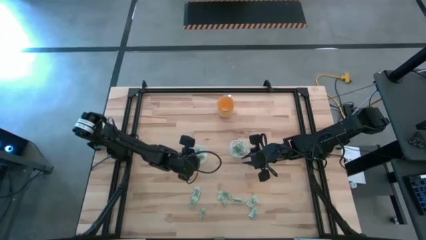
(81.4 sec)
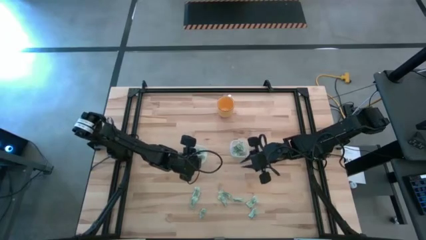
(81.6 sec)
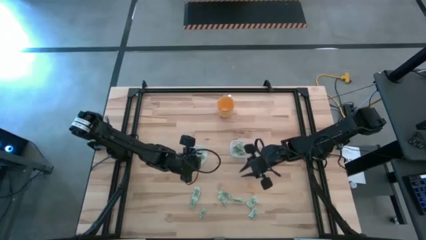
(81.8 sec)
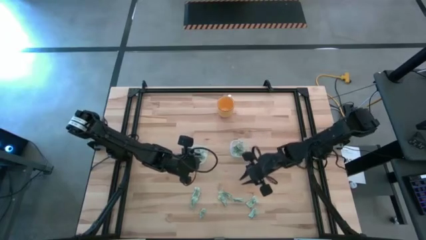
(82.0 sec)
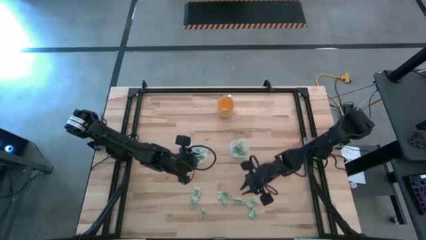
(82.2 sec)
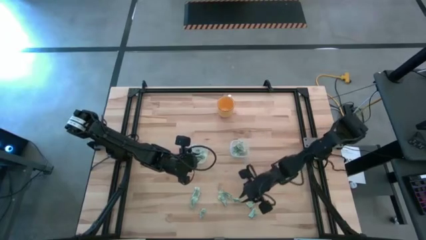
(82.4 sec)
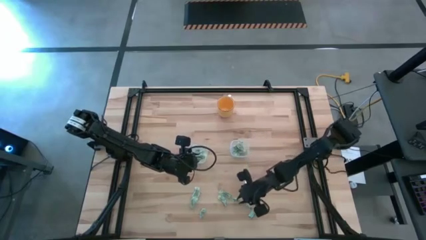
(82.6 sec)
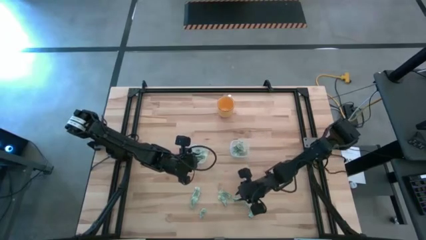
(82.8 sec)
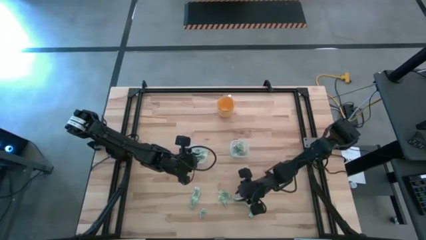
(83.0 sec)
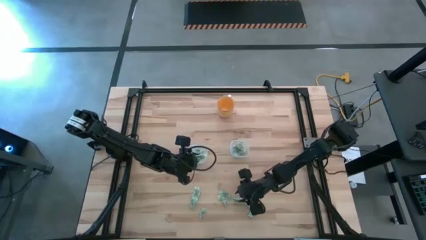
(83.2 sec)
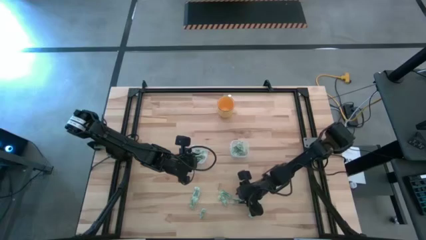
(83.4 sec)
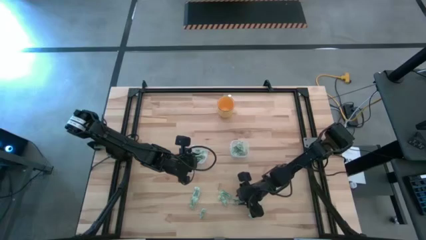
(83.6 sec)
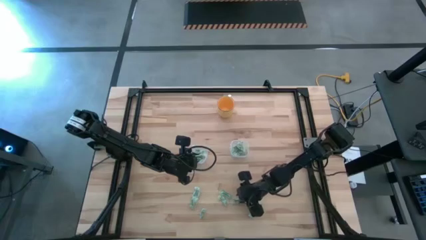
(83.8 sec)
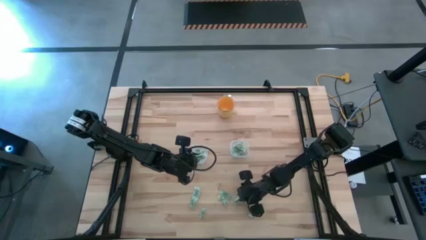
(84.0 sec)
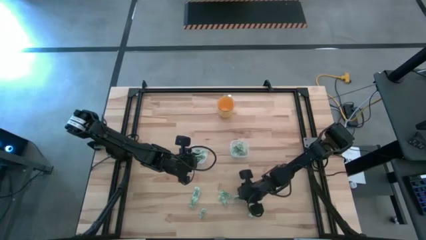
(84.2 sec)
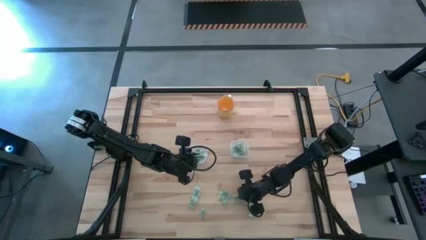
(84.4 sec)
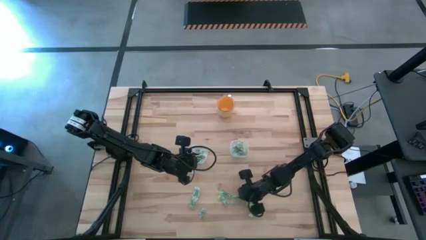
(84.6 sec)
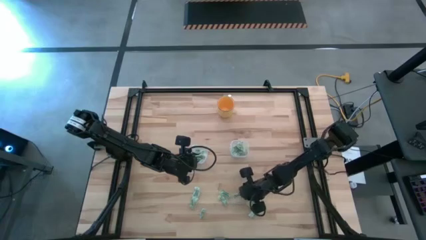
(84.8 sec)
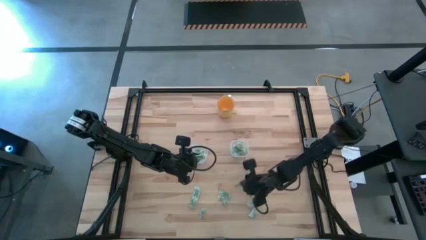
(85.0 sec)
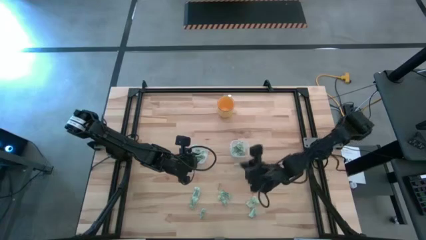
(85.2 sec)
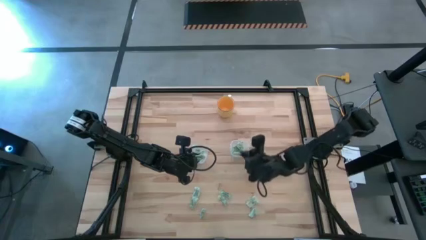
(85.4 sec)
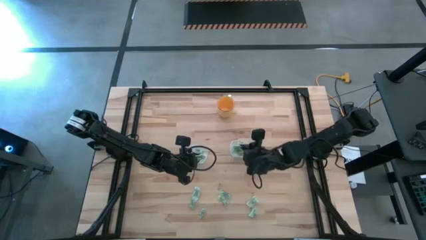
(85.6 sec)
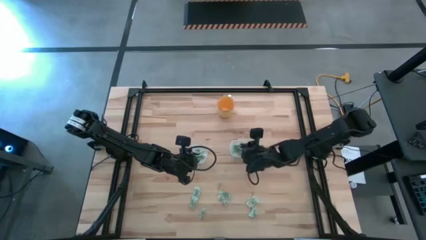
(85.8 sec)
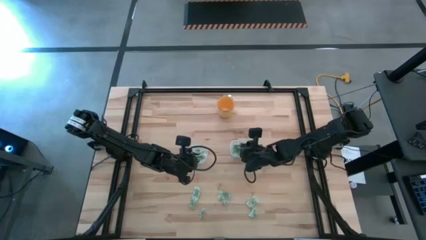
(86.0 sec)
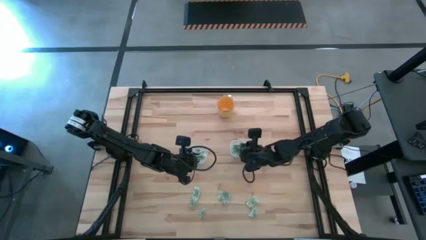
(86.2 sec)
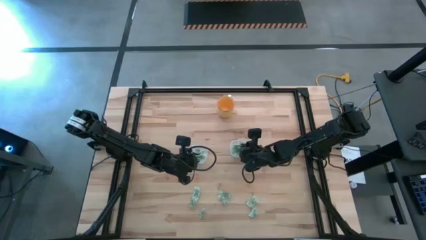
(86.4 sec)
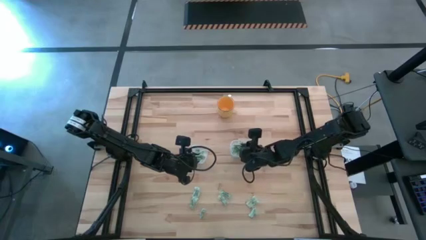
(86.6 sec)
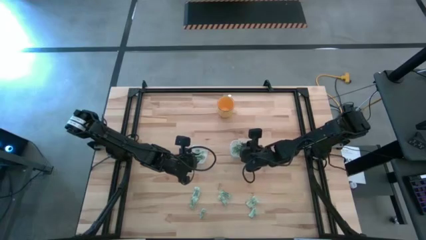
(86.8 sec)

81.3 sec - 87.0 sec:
Task: Pick and place items into bin
Put the green sweetener bag into the right transparent food container

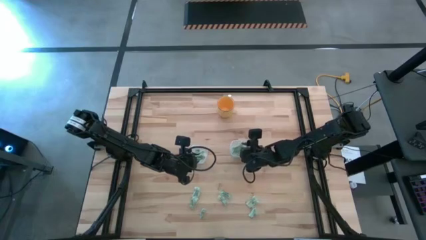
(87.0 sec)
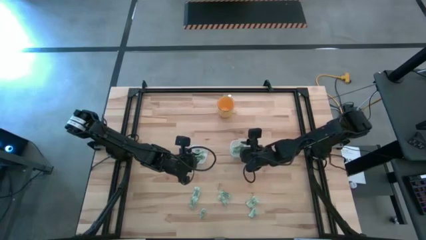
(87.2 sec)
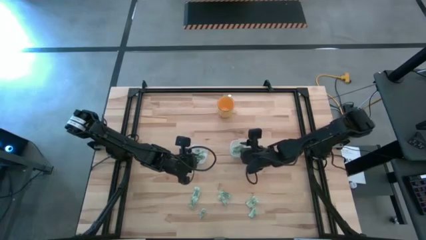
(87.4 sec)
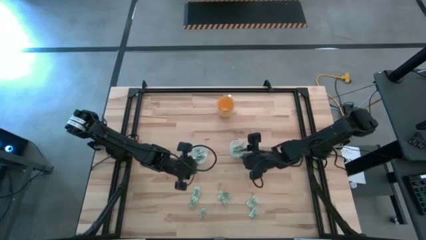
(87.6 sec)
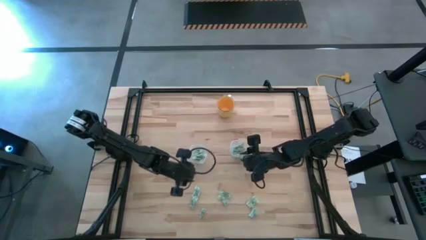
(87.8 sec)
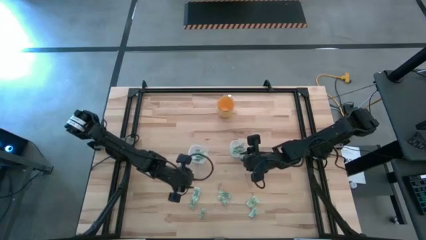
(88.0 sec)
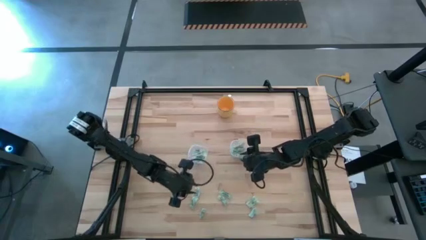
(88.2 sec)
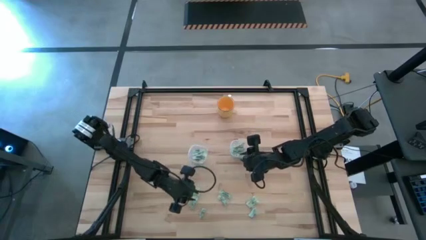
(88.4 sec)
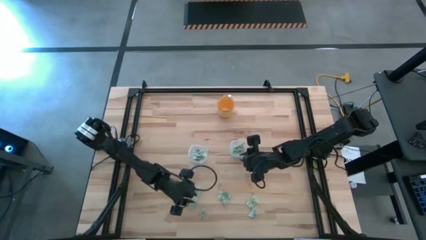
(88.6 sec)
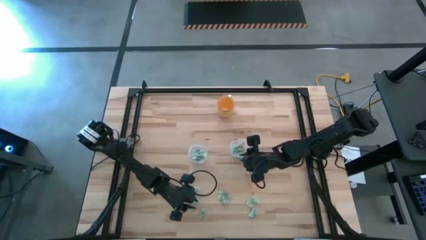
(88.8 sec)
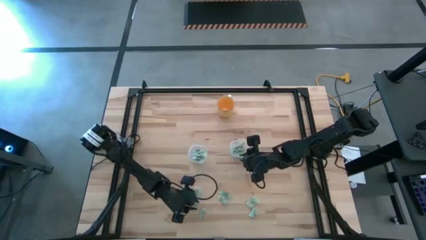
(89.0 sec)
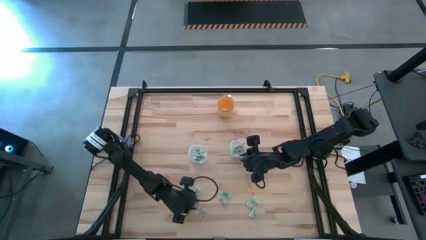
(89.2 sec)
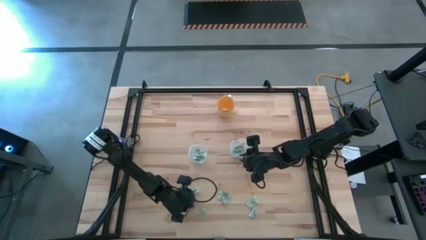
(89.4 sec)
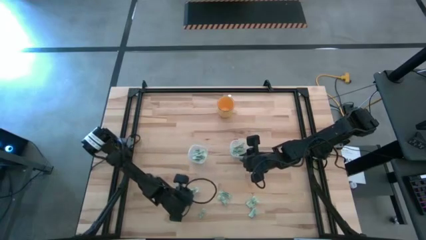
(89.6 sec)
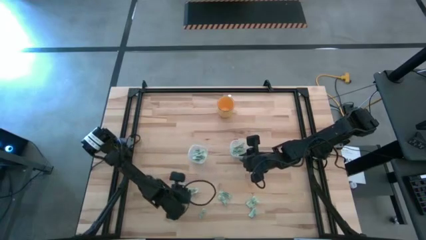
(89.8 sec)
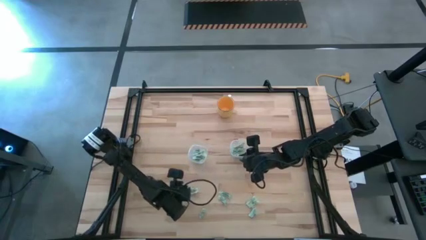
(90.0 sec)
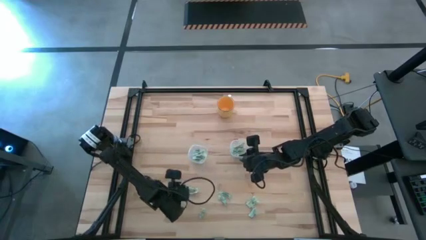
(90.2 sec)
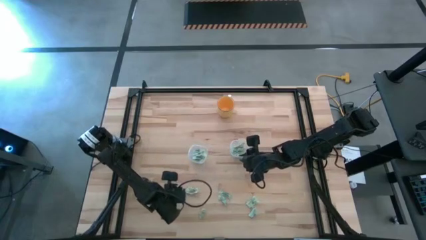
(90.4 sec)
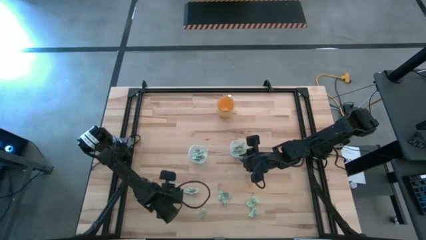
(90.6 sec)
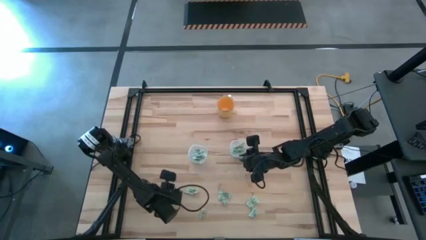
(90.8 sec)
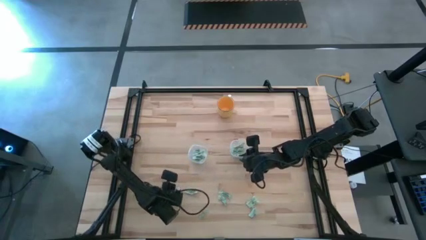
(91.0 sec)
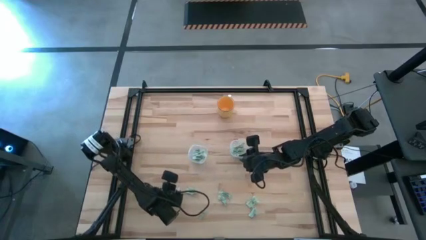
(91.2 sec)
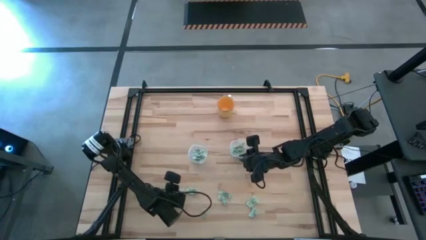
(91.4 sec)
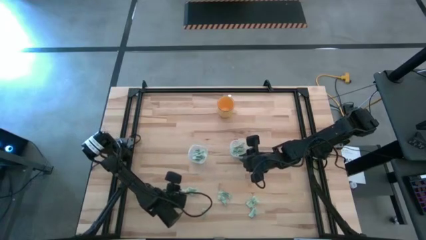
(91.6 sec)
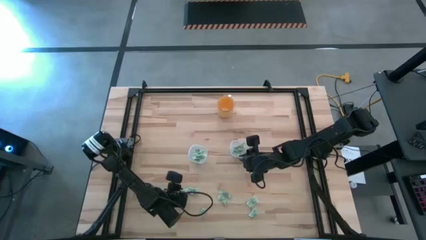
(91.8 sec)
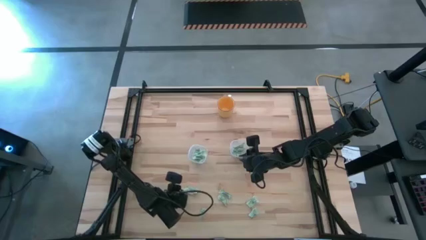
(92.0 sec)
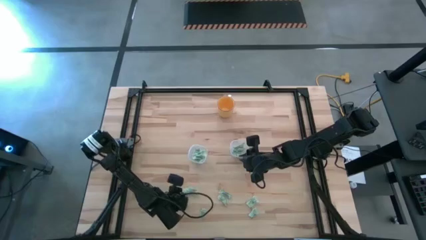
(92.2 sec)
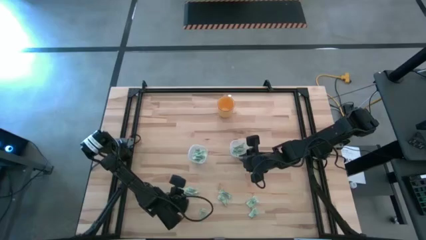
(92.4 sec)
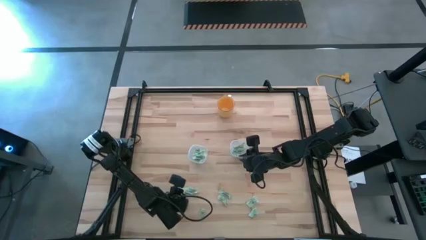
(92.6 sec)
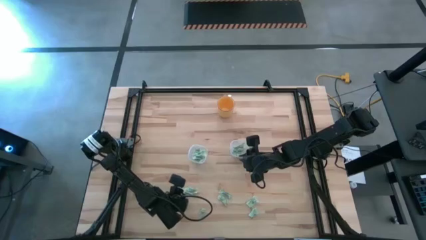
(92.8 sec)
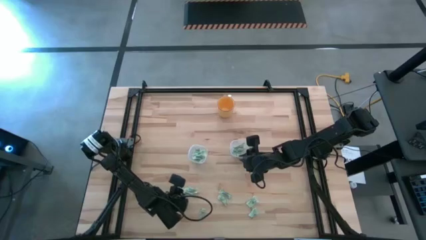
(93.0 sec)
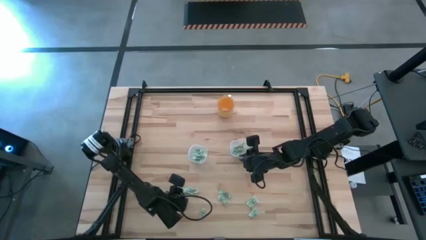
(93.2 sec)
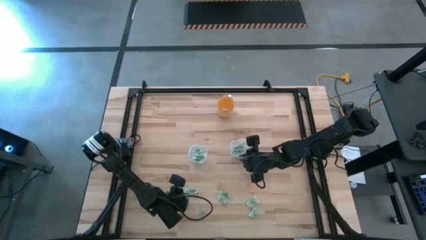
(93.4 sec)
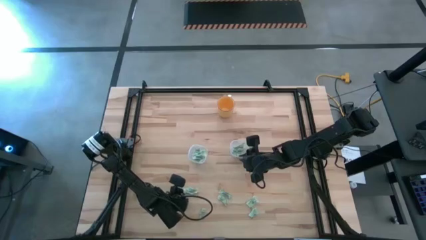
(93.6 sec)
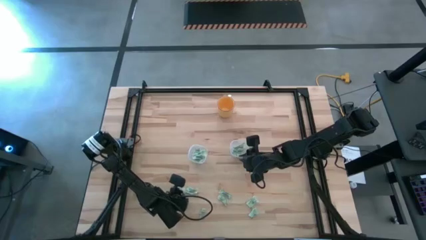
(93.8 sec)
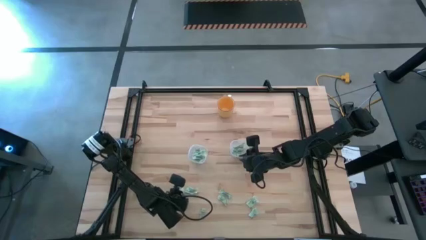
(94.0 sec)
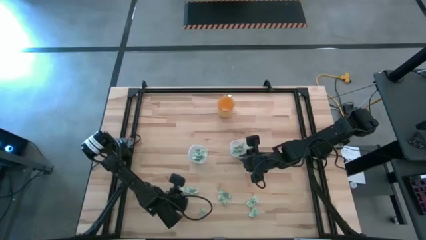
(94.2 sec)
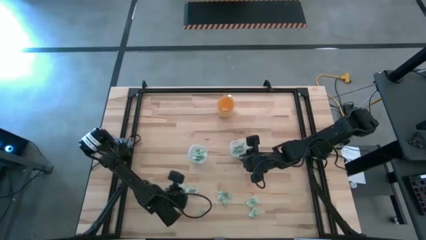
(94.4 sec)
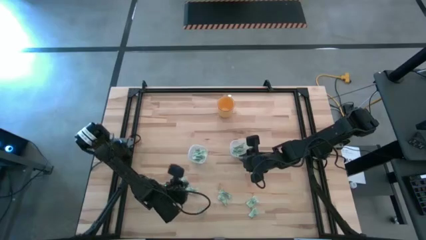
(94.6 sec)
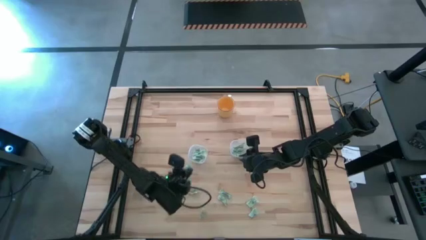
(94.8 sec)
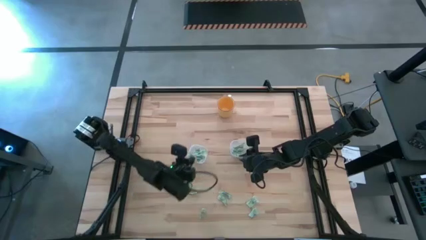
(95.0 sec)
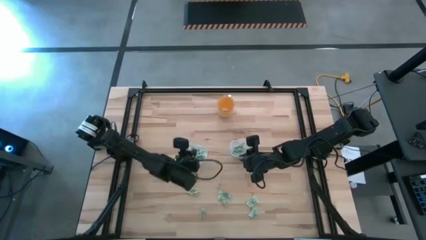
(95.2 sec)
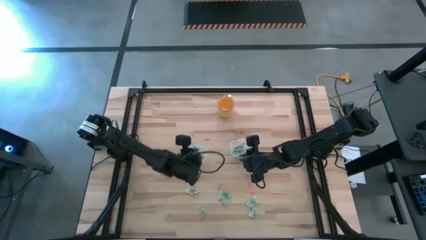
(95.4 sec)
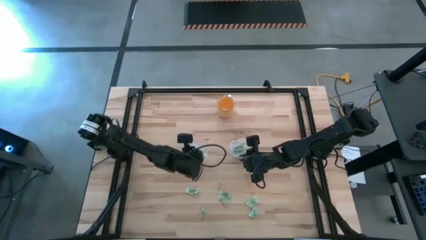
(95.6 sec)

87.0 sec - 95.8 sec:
Put the green sweetener bag into the left transparent food container

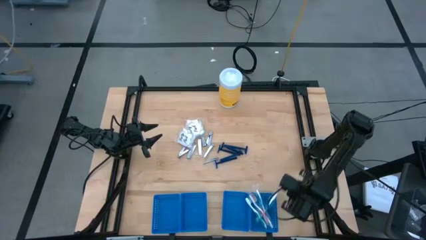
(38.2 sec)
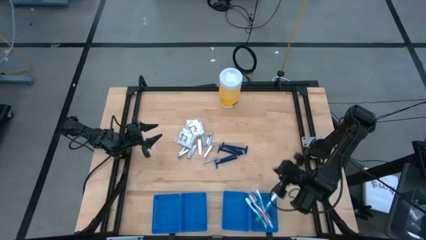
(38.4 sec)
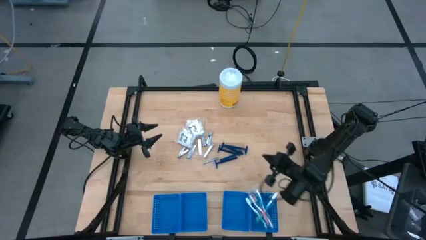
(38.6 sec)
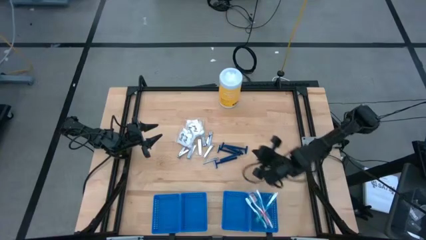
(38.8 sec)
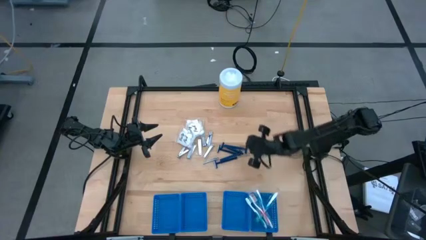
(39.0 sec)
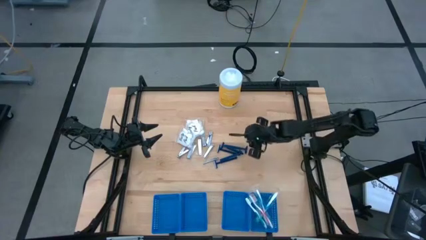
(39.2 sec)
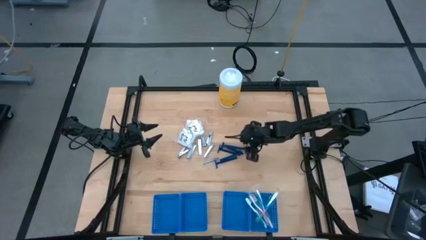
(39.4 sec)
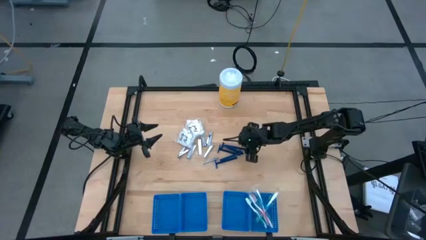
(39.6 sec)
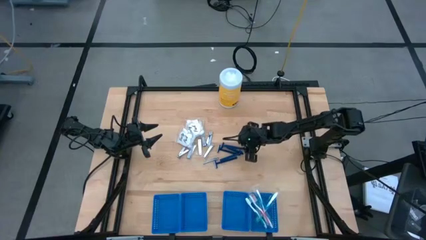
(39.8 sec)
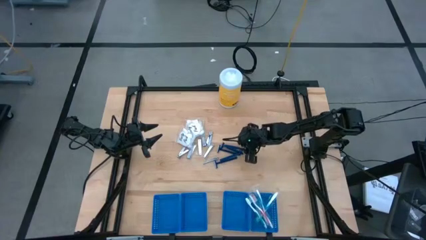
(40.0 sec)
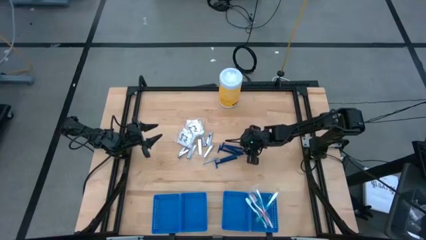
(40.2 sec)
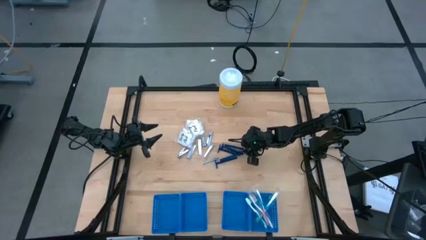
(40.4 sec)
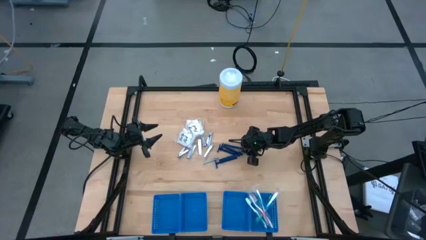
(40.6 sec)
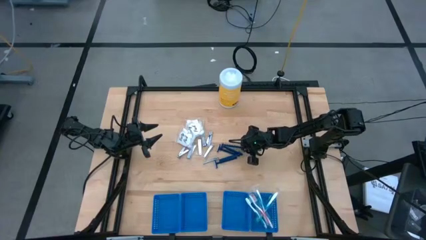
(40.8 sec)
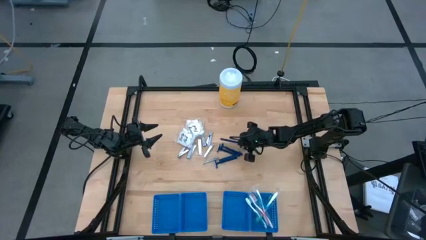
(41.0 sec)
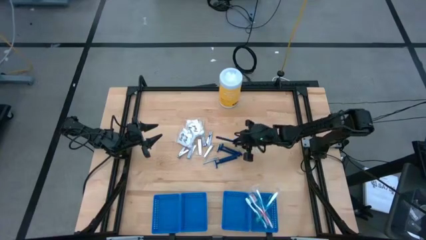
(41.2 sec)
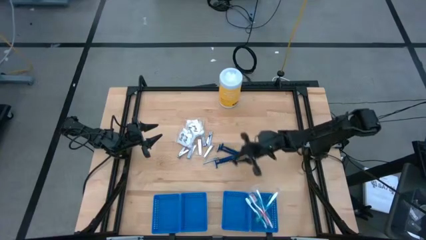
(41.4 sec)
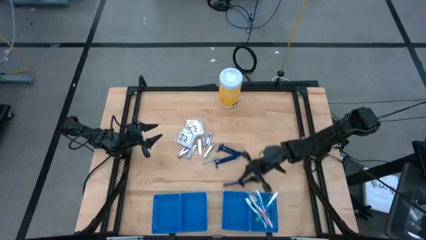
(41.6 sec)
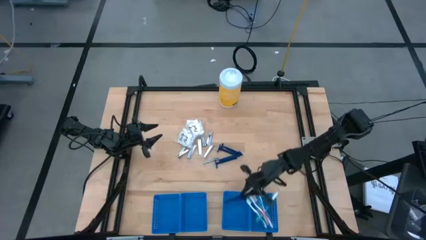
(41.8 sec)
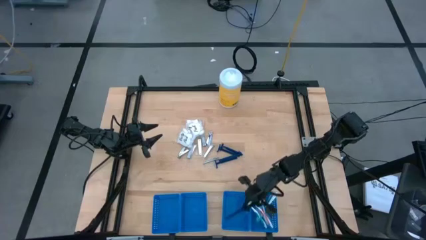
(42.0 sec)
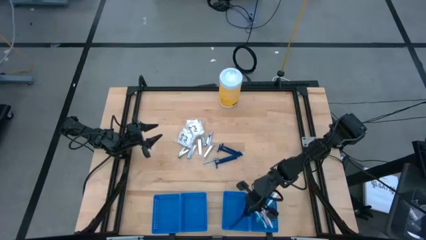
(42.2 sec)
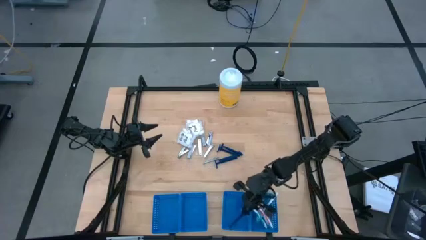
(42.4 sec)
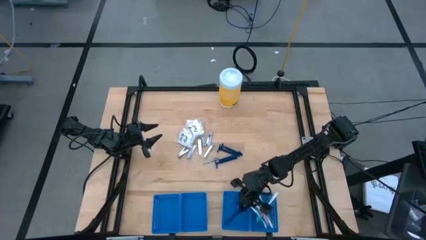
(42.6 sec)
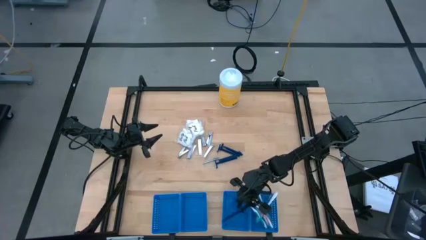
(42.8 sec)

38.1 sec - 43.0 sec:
Task: Pick & Place Travel size toiletries
Put the razor into the blue basket
